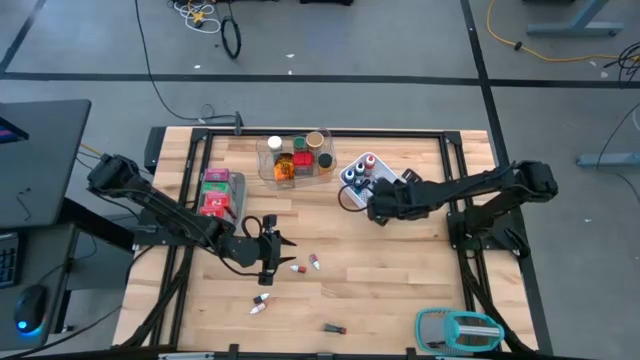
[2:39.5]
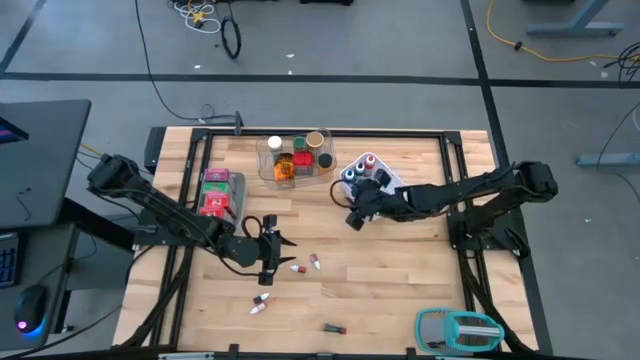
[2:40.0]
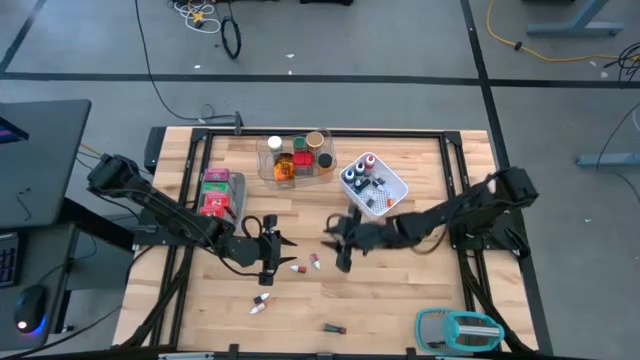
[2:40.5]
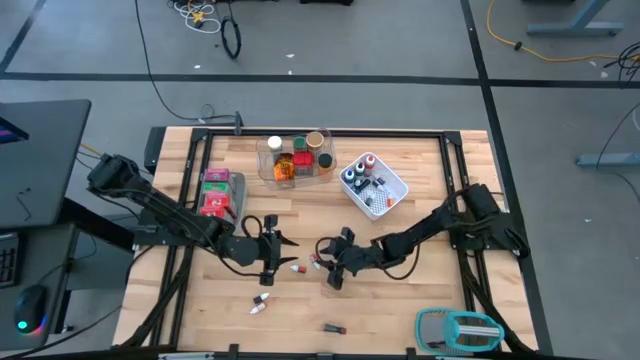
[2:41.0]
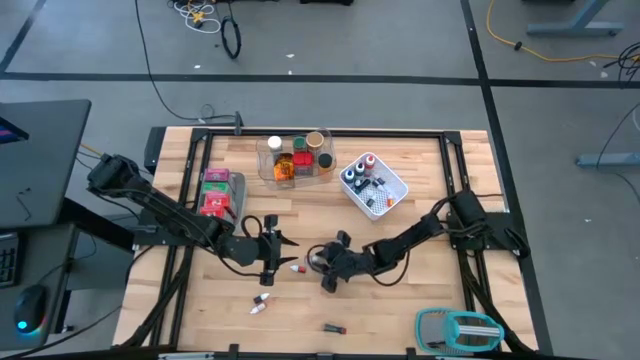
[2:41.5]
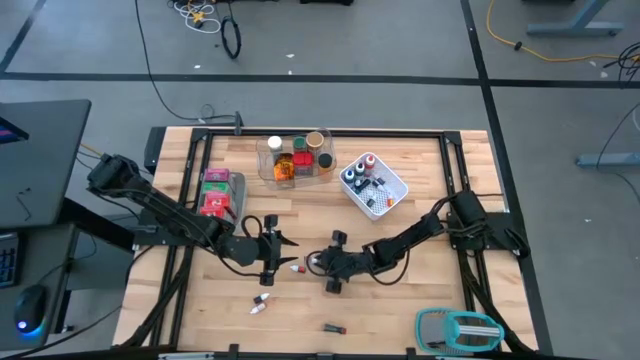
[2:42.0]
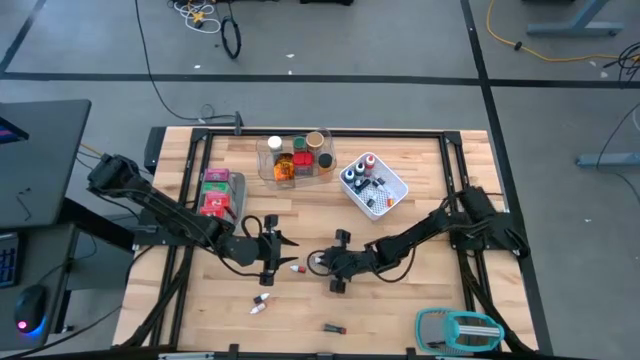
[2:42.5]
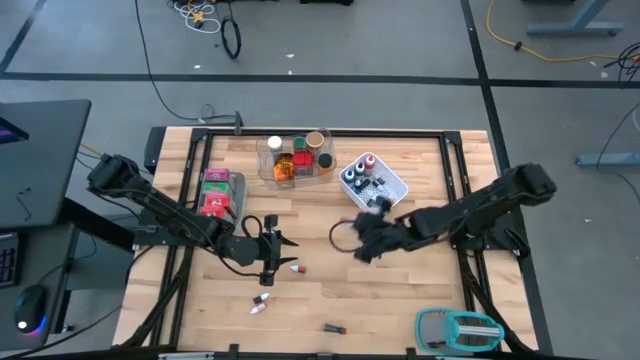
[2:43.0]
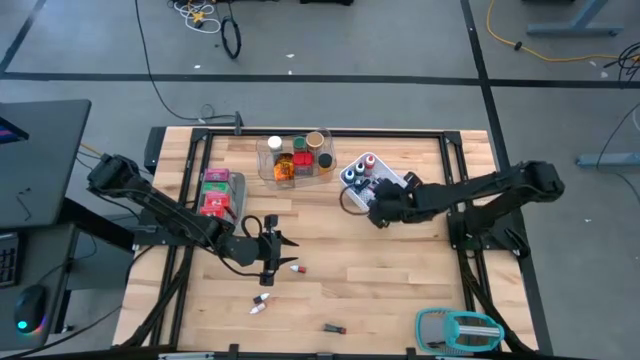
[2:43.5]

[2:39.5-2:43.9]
Task: Pick & Place Kitchen Items
Put the pink food coloring bottle into the white bin

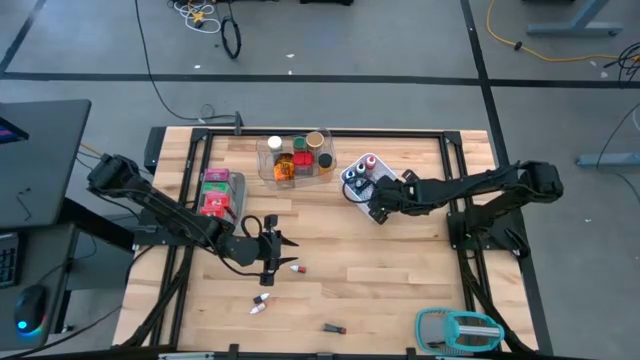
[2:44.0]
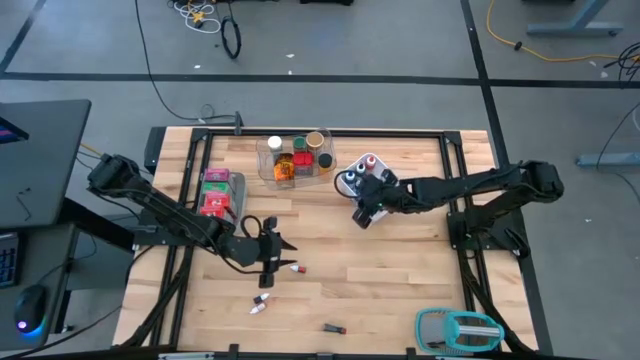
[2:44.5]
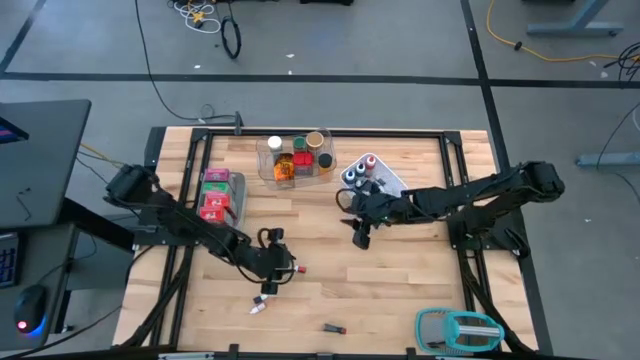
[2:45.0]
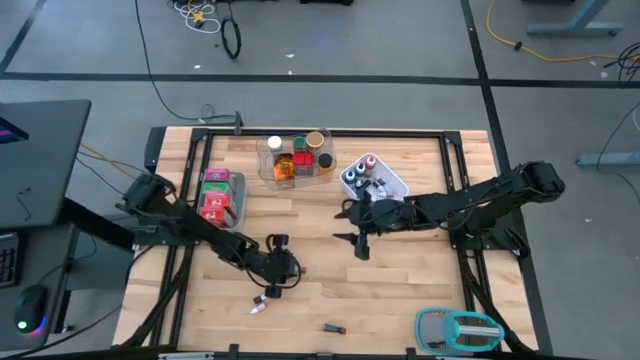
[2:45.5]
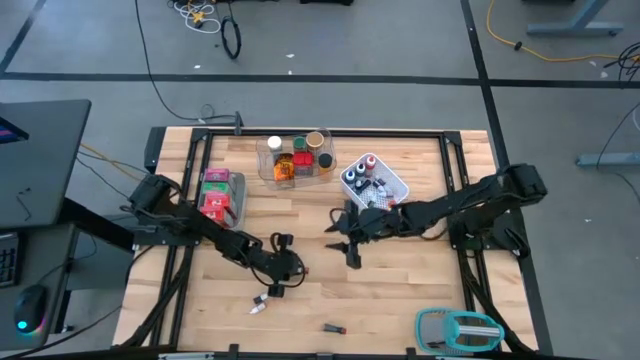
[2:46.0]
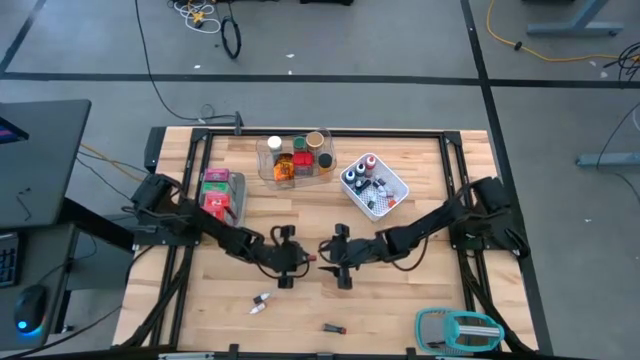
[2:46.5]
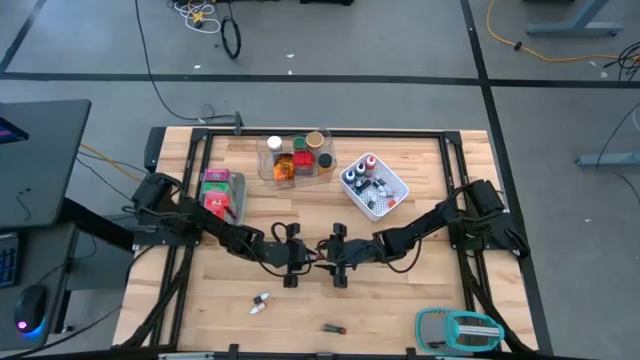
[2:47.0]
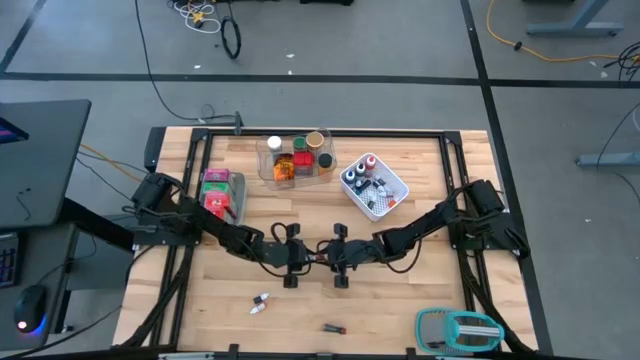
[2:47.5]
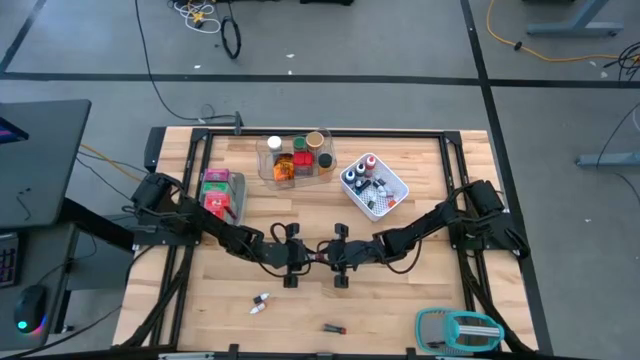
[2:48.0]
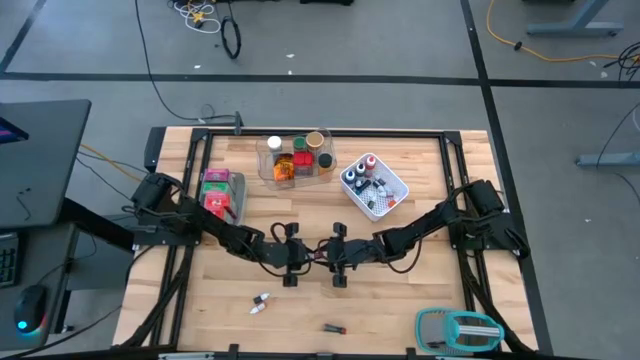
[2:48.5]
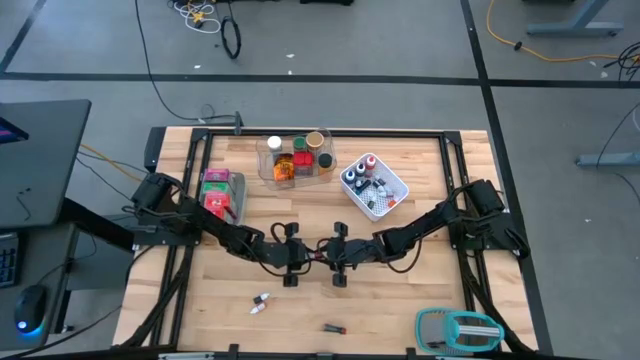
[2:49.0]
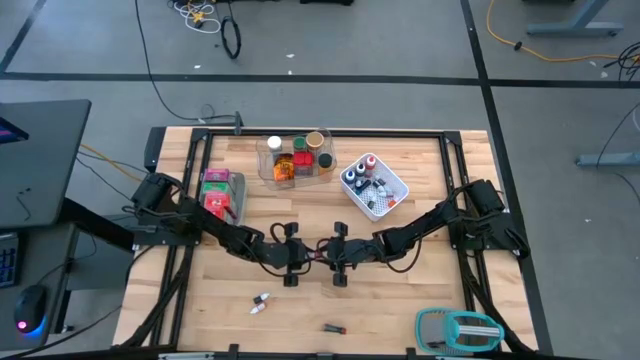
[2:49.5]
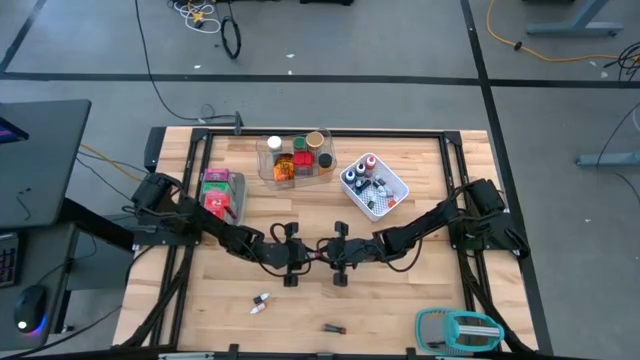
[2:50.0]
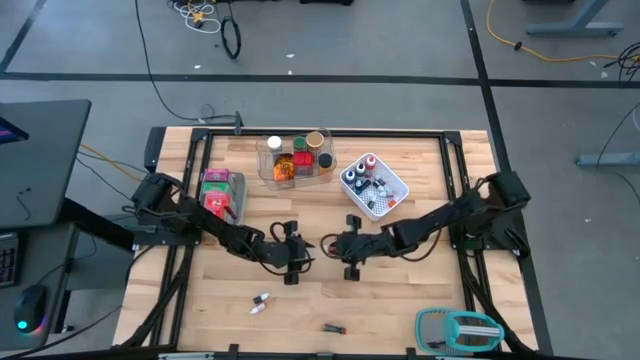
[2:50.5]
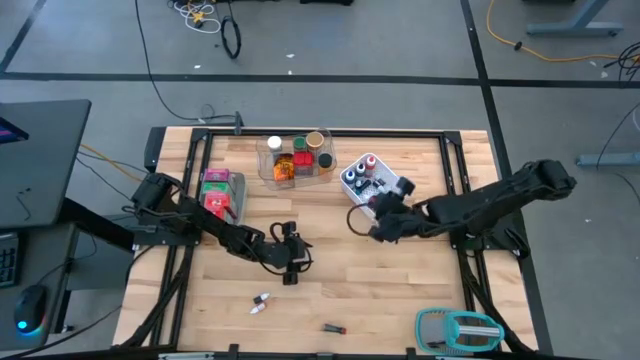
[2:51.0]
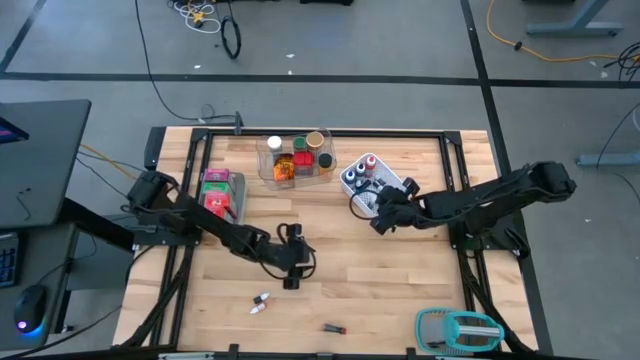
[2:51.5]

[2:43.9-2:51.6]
Put the red food coloring bottle into the white bin

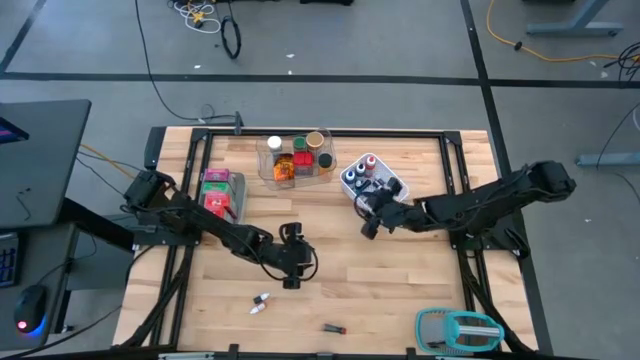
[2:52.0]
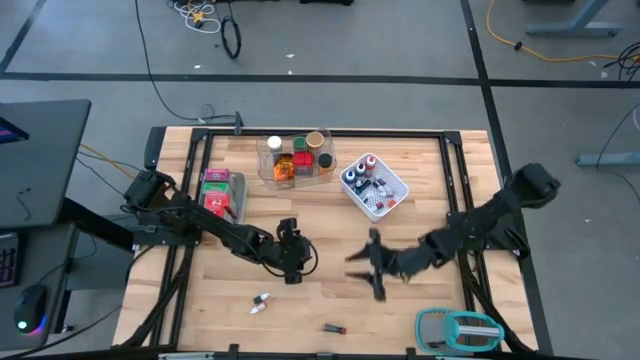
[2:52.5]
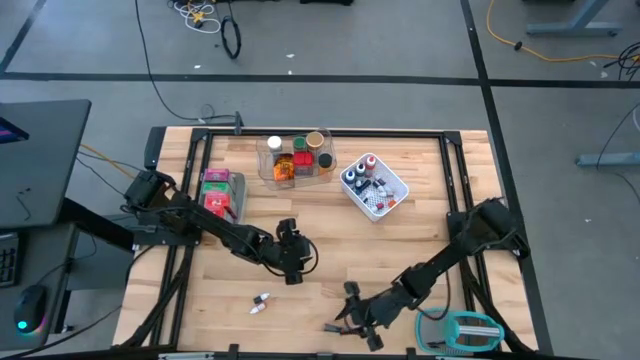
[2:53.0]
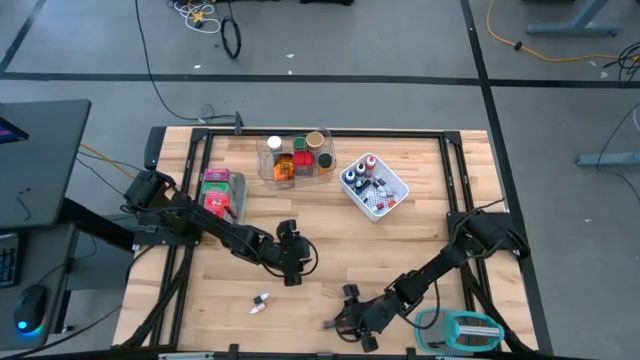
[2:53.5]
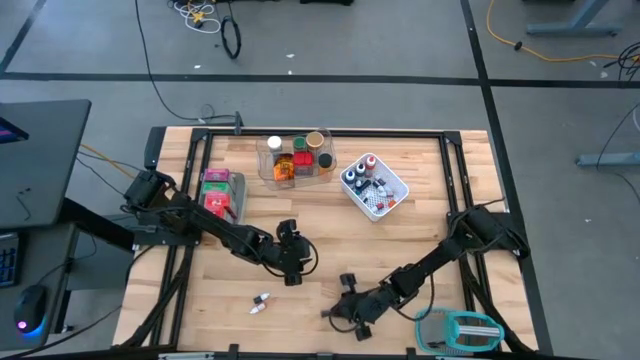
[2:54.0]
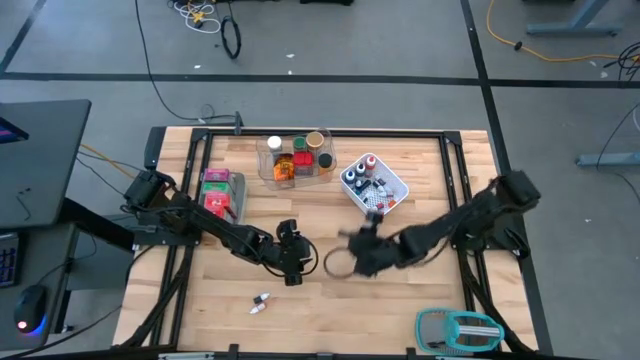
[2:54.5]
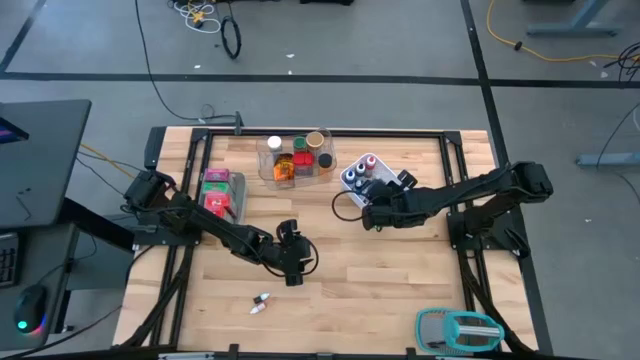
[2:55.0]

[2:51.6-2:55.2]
Put the red food coloring bottle into the white bin

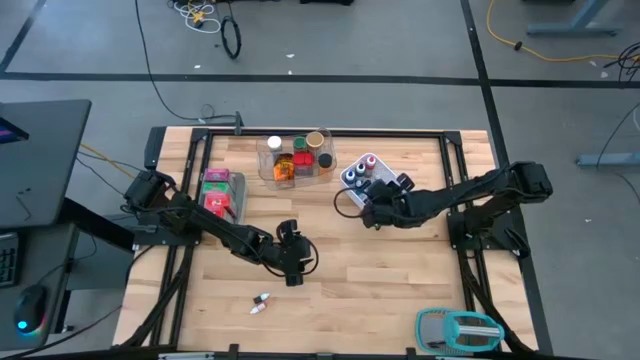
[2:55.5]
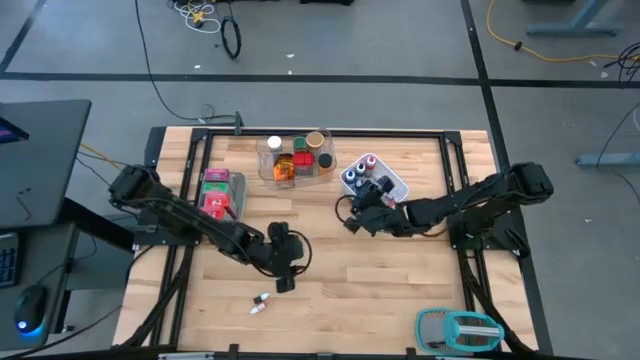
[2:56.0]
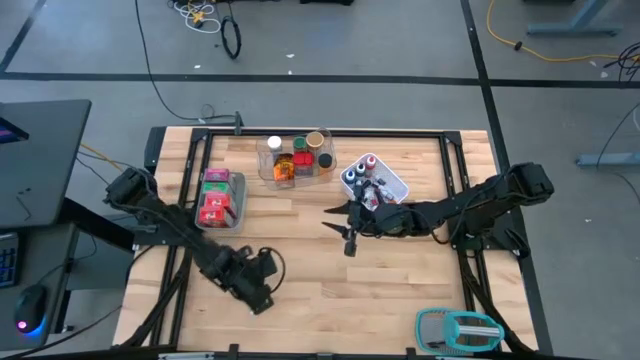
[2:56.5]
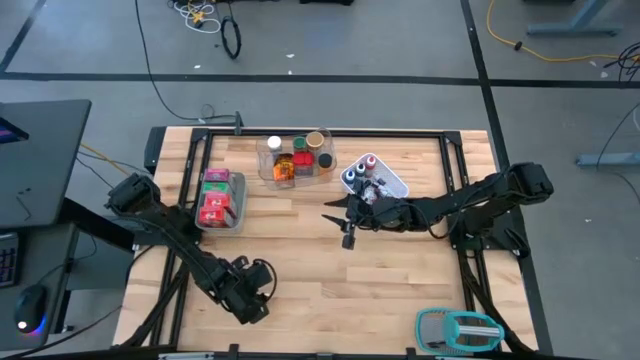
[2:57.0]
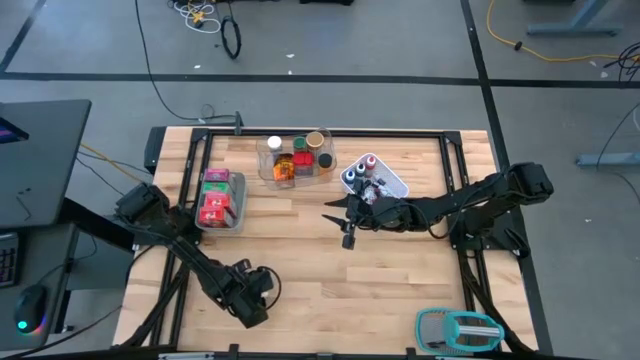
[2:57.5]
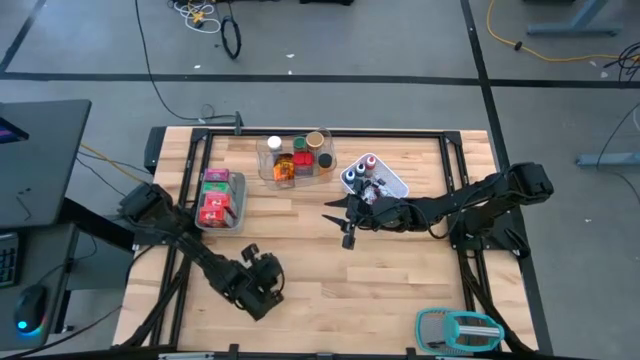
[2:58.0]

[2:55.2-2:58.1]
Put the black food coloring bottle into the white bin

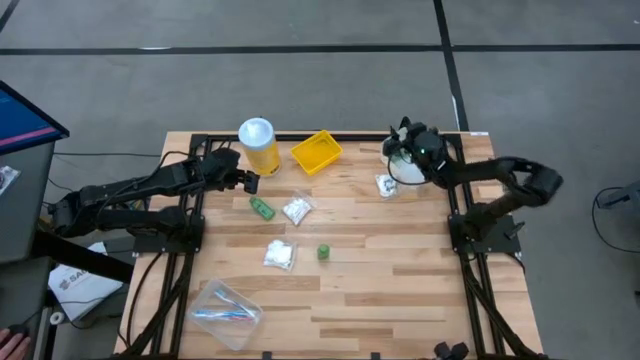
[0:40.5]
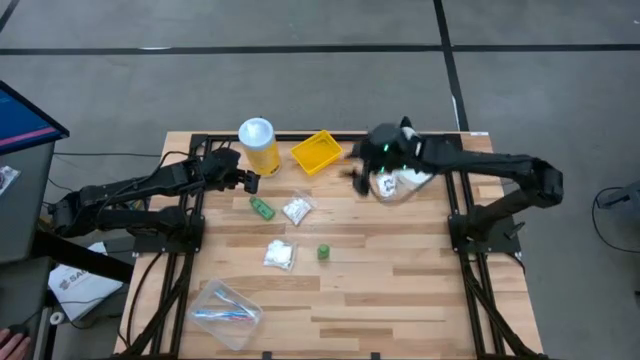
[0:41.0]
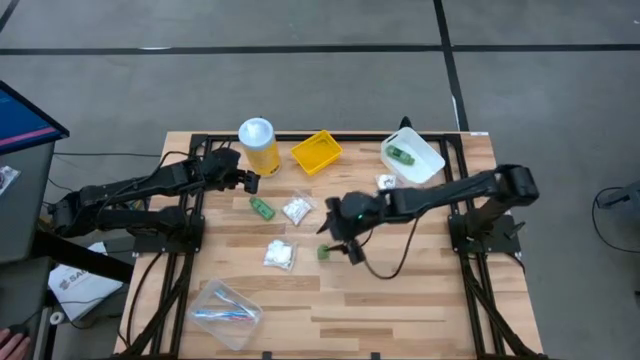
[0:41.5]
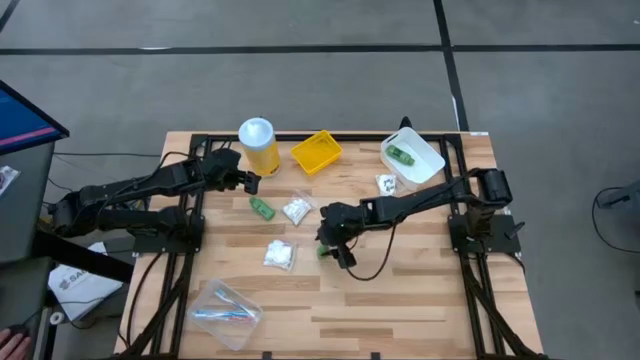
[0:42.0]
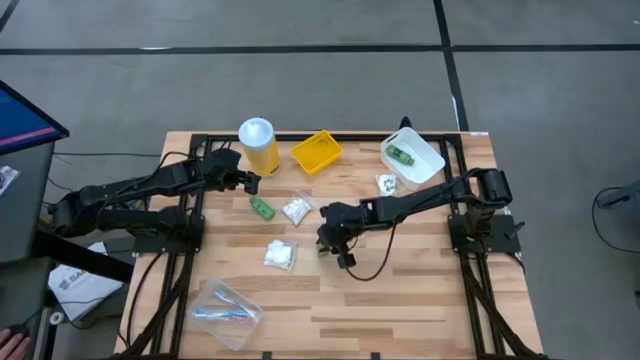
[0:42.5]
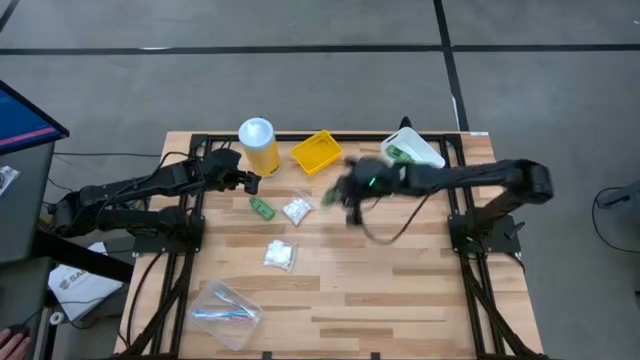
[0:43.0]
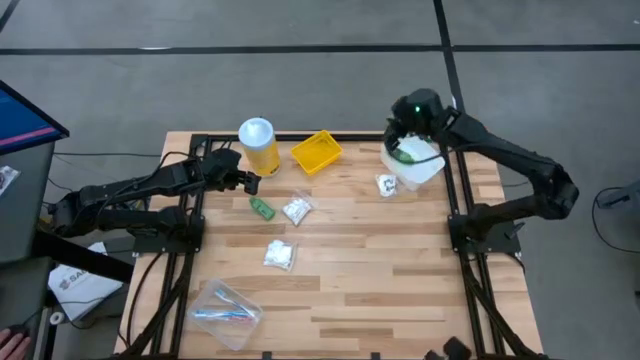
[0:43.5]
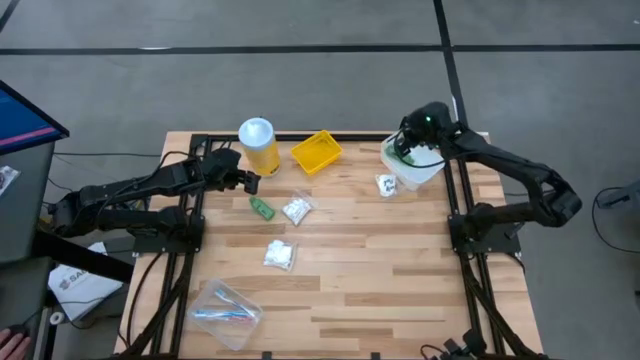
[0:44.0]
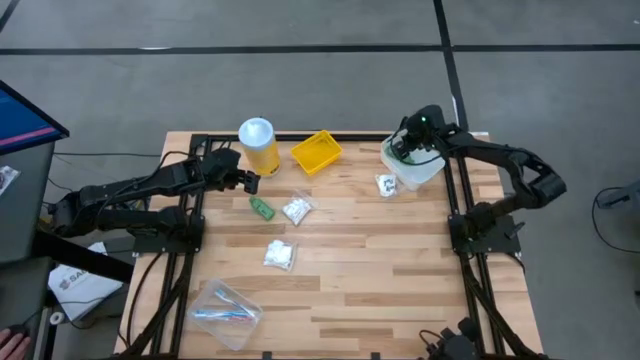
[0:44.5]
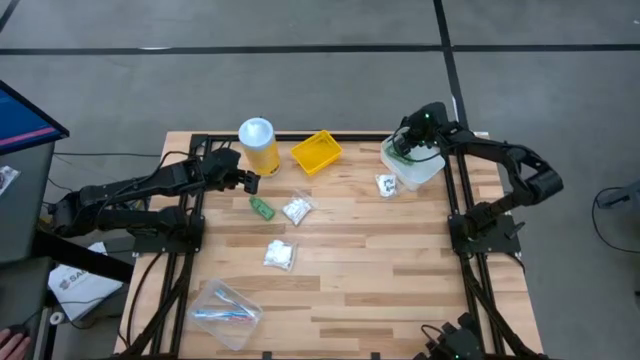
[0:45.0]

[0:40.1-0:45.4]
Task: Pick & Place Travel size toiletries
Put the green shampoo bottle into the white bin
